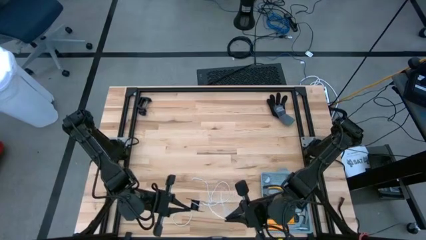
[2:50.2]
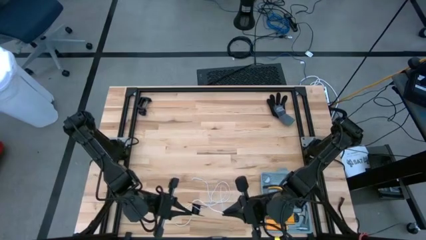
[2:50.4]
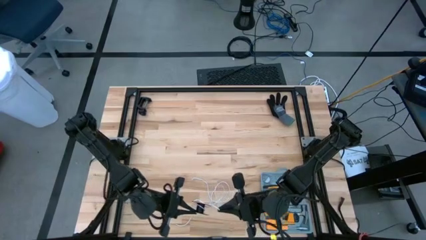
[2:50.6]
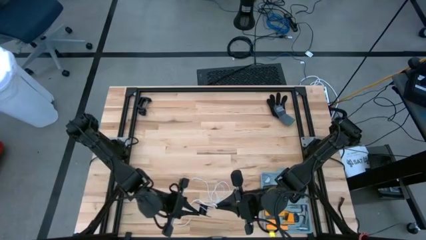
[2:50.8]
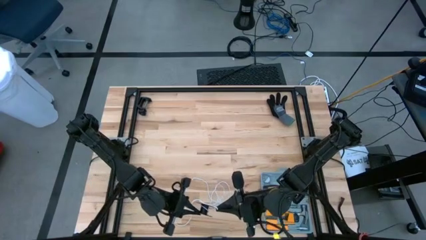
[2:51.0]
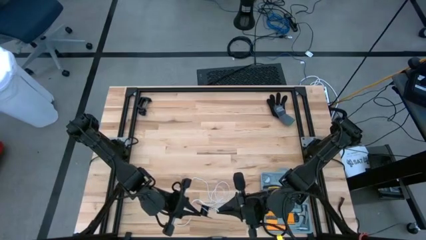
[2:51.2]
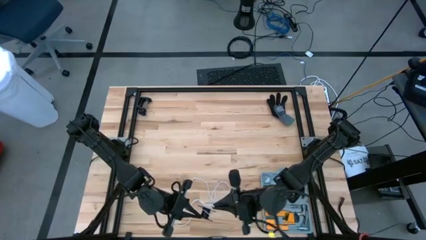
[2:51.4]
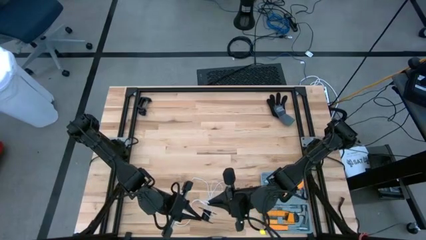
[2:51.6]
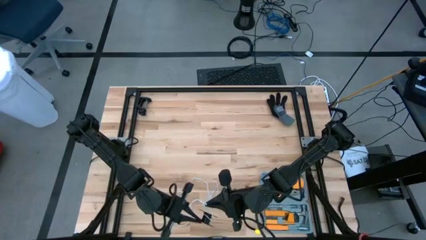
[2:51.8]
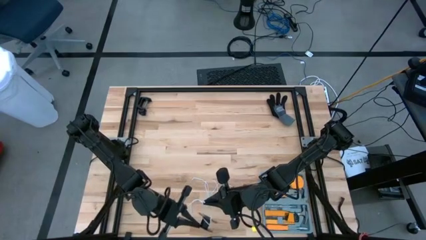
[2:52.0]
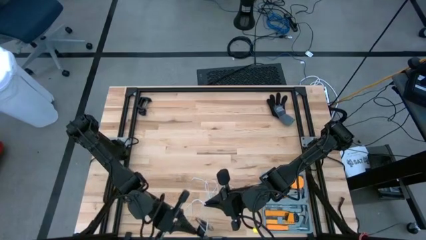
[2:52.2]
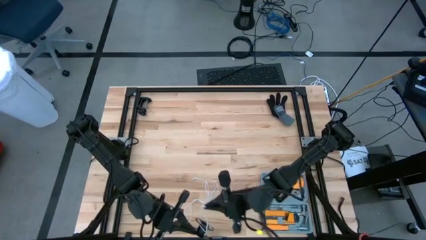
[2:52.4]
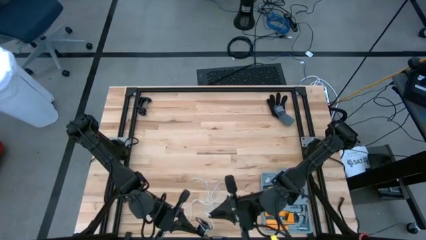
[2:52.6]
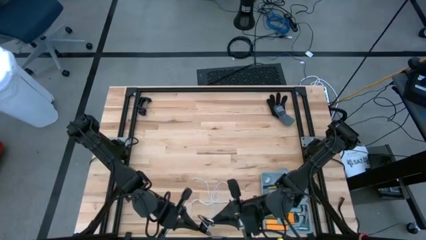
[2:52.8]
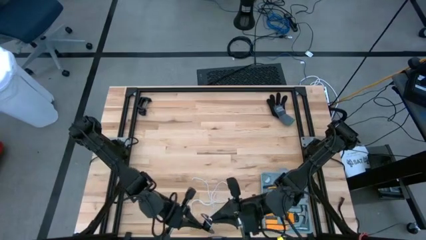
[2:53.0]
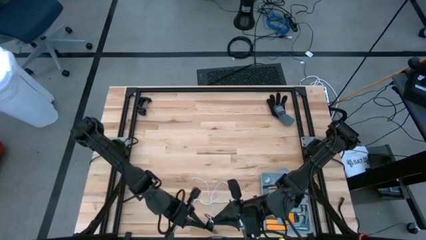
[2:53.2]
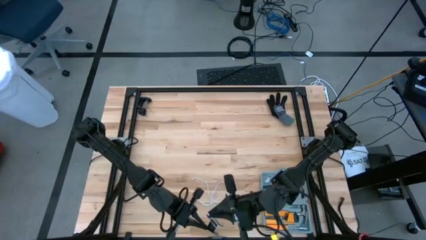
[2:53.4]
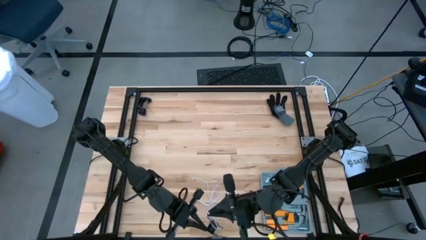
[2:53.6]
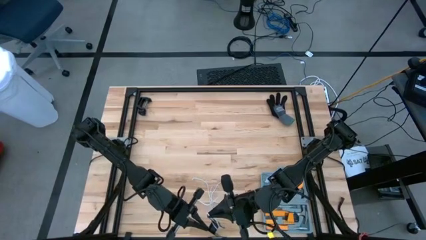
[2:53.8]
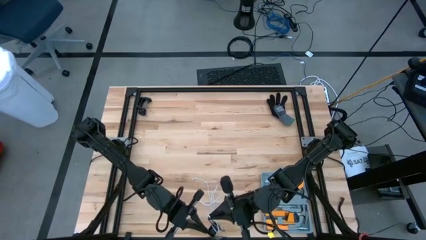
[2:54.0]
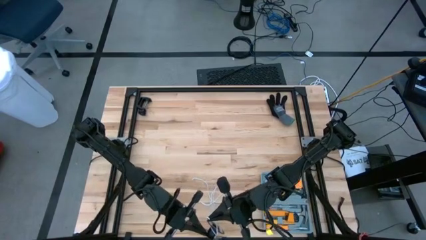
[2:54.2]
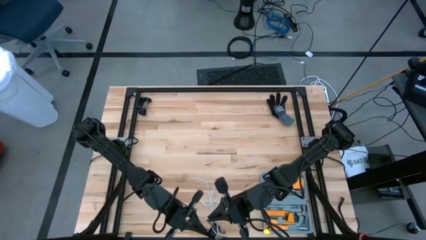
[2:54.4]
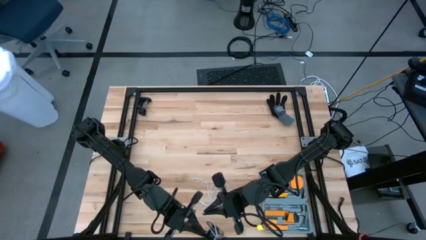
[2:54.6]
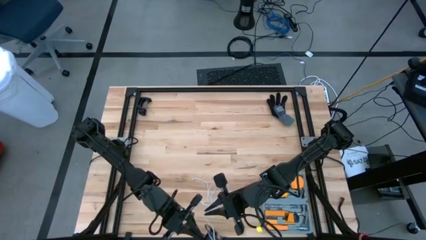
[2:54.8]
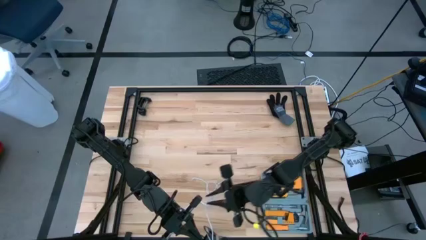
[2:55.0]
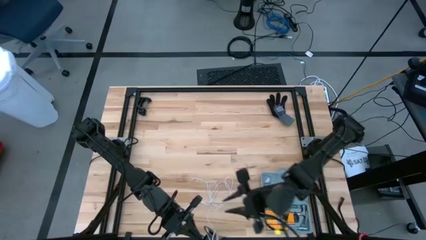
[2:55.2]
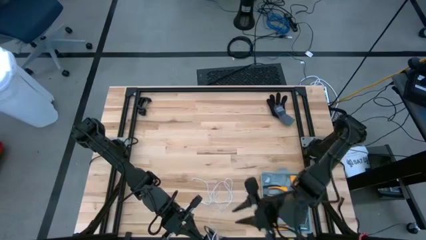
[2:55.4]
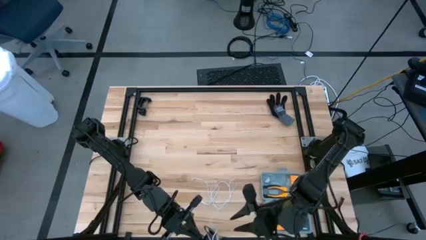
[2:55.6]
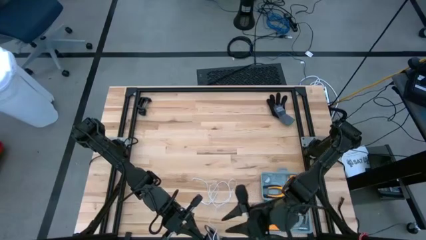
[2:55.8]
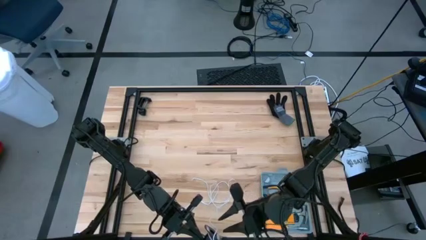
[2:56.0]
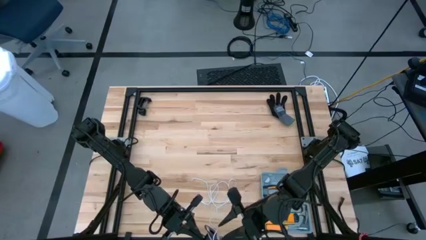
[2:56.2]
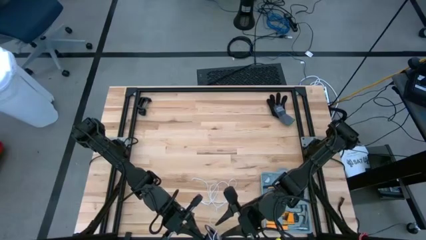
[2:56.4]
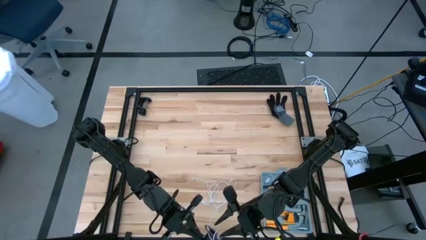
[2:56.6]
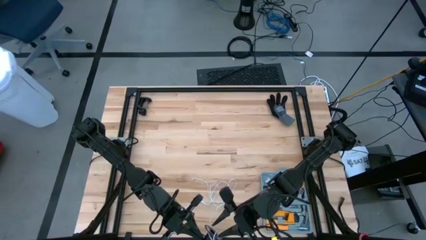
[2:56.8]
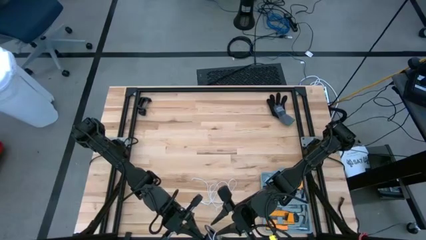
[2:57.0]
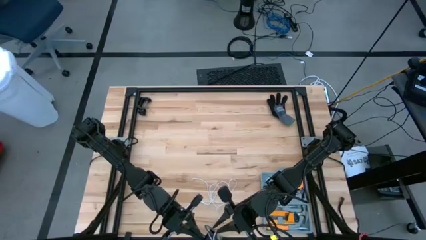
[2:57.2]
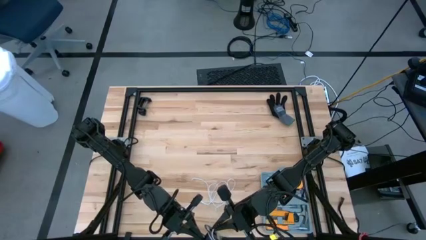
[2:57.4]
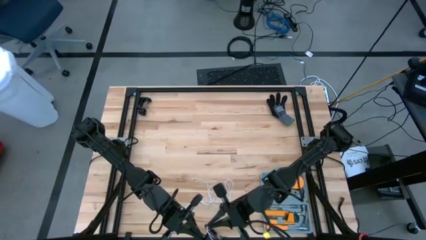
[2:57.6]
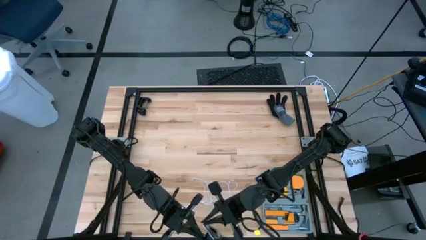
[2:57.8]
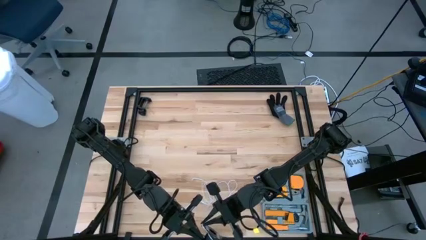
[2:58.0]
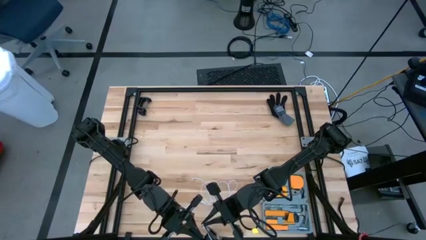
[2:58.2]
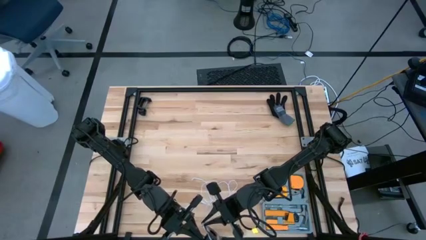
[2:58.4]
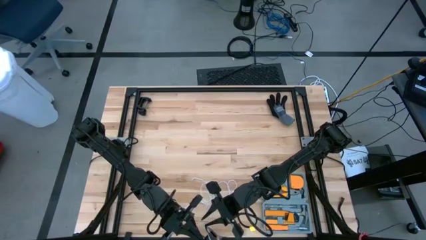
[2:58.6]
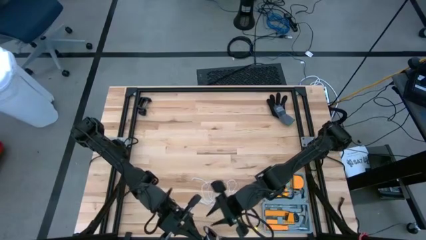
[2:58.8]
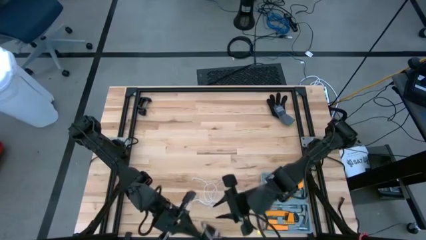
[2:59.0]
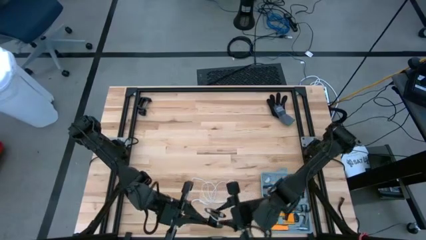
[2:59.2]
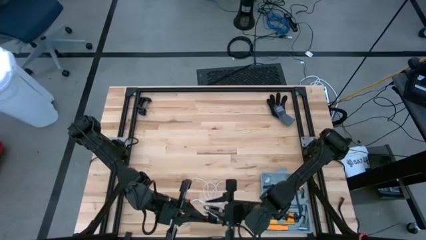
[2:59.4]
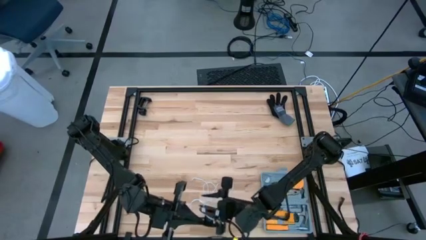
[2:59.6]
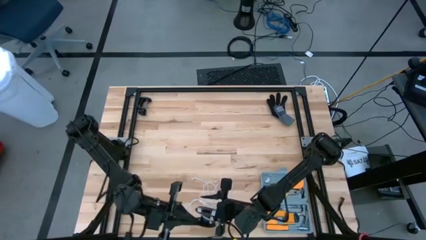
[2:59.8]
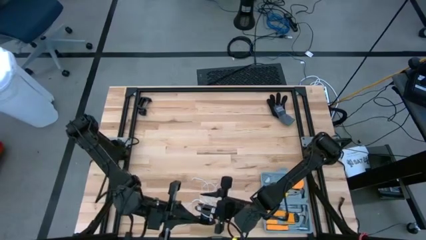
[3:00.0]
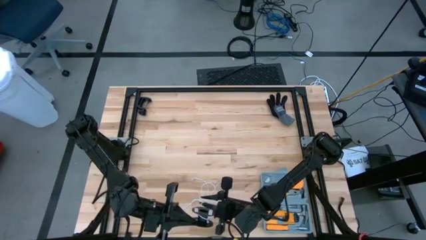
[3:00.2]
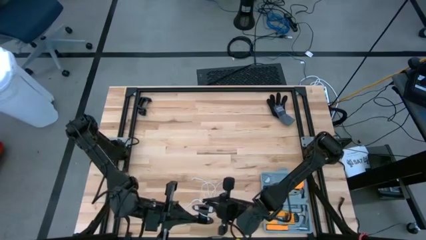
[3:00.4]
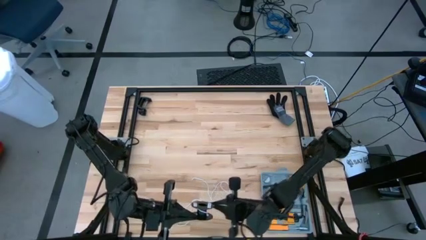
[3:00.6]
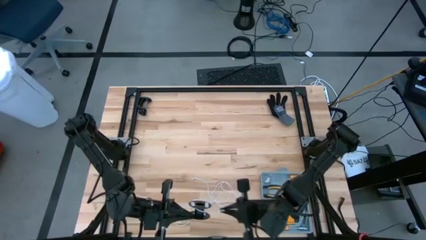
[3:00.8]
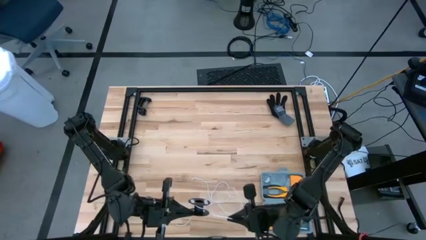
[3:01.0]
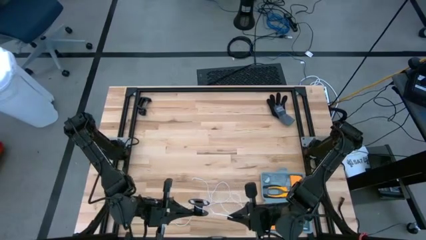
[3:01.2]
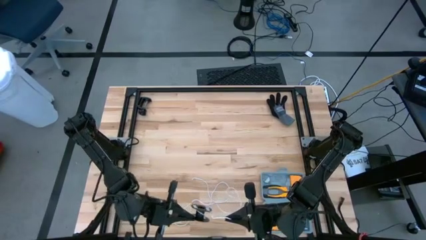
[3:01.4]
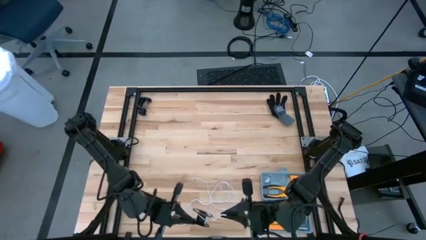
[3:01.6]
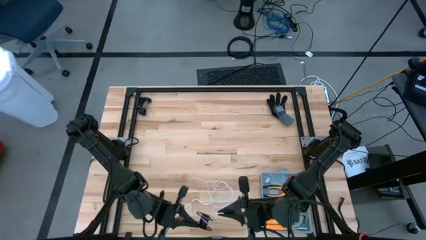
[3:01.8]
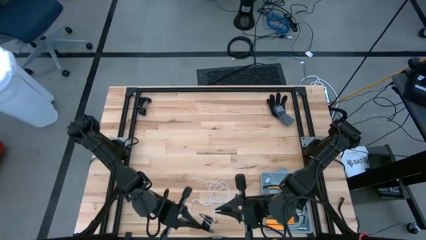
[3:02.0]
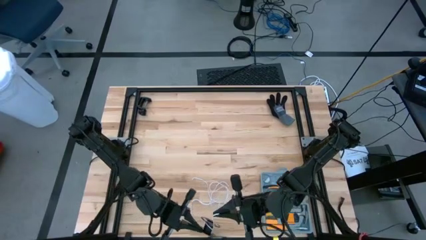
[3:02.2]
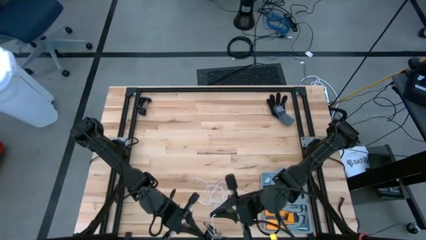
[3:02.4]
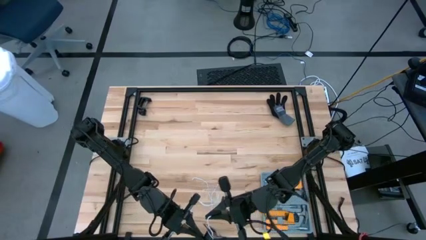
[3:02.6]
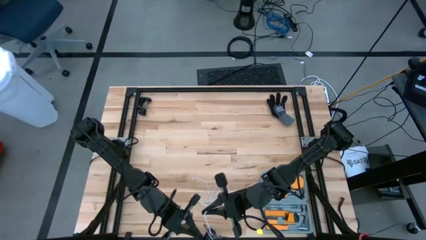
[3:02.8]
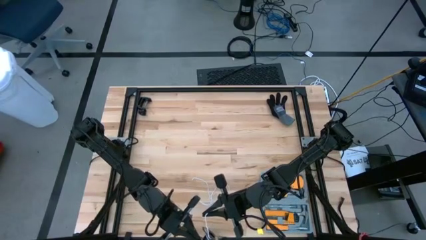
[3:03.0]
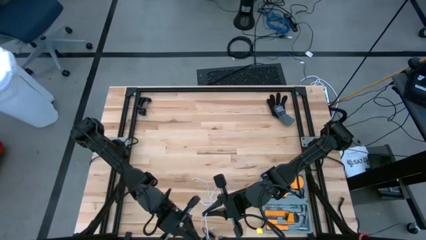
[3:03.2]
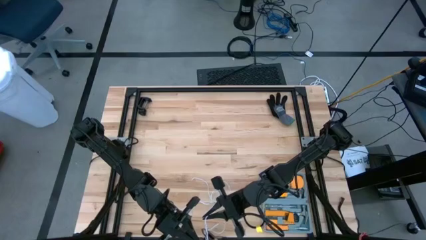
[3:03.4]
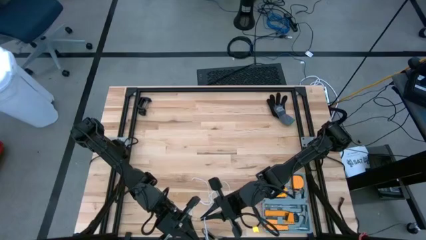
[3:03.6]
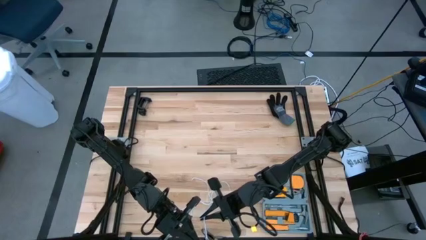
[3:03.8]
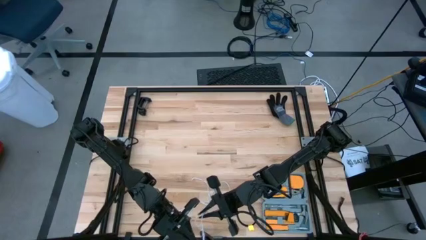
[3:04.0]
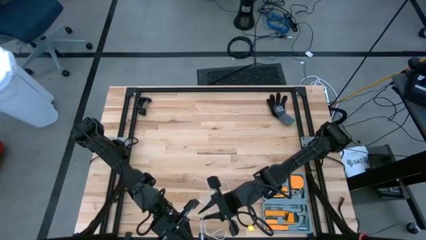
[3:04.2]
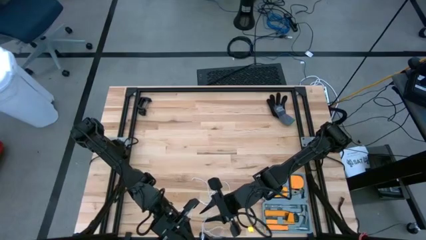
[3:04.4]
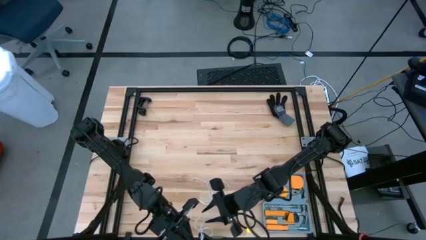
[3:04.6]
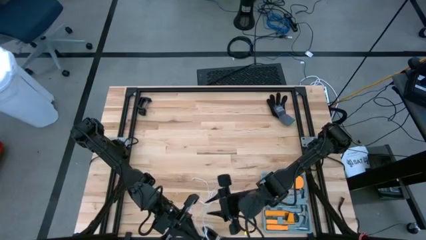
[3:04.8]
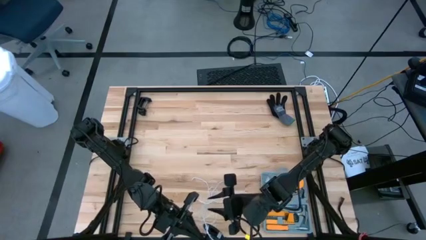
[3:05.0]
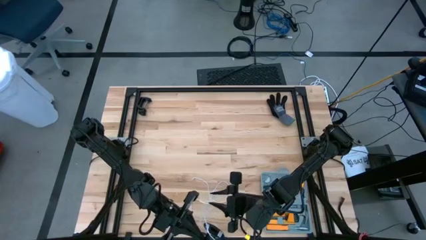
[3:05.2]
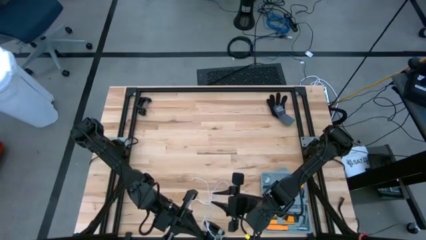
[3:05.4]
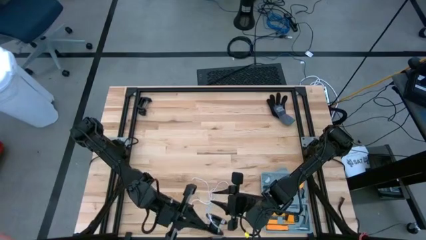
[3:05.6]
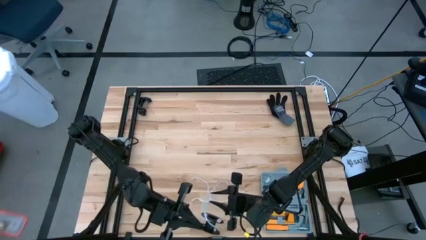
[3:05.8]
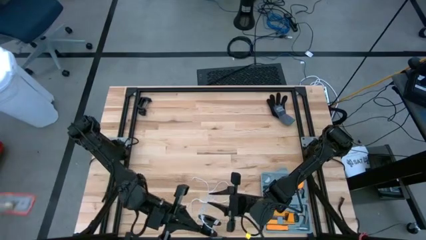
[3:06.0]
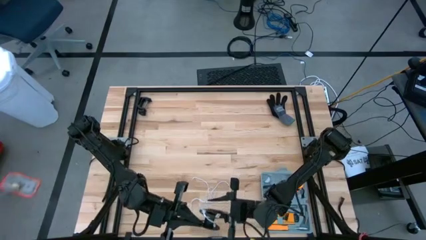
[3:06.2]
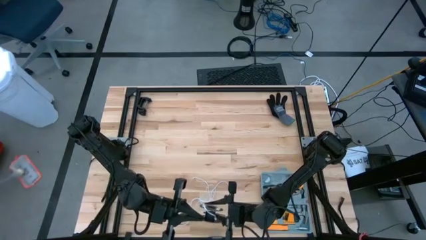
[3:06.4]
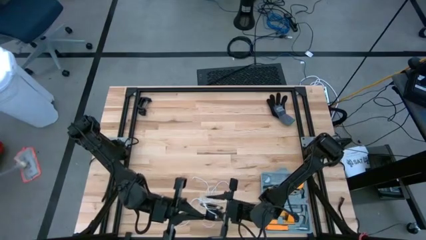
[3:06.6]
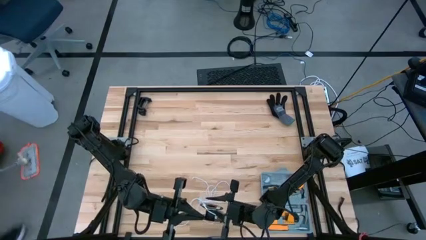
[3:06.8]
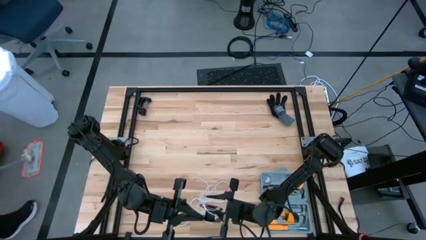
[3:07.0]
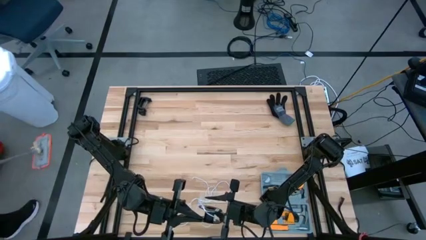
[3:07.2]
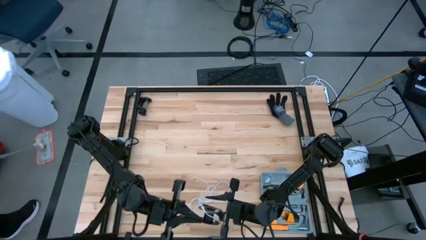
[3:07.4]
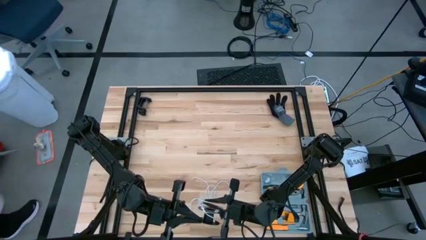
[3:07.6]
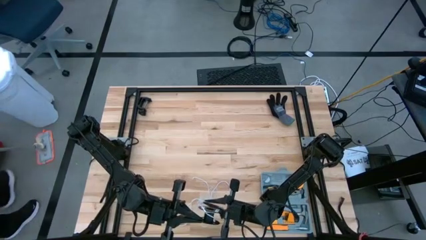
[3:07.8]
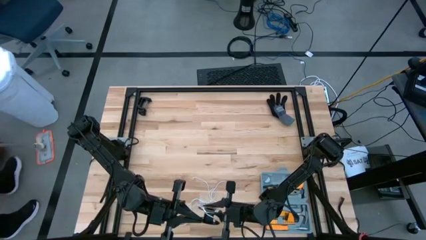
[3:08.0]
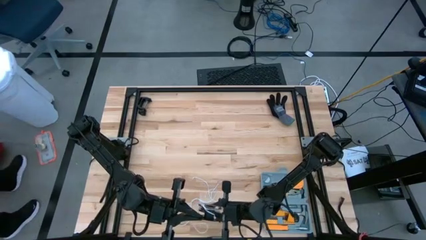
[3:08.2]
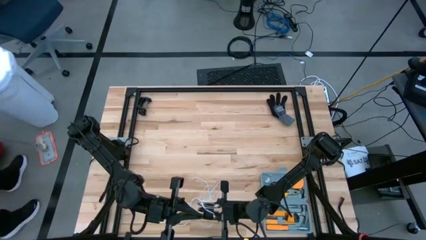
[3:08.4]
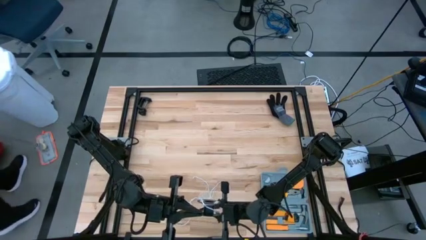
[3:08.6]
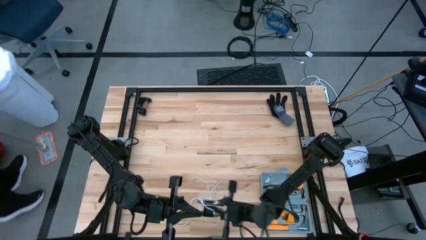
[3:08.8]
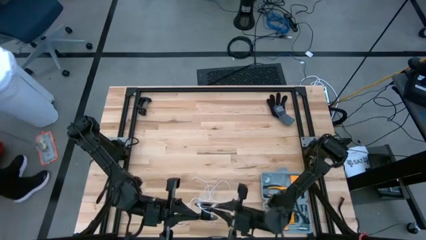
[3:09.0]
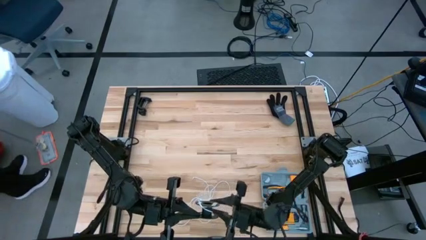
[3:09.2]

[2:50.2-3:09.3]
Task: Coil cords
Coil the white cable wire onto the spool
